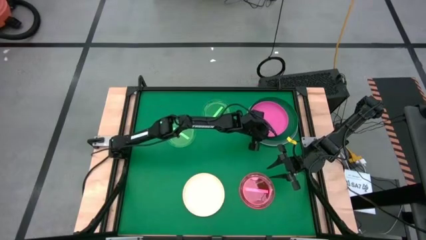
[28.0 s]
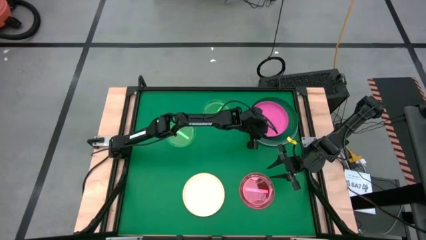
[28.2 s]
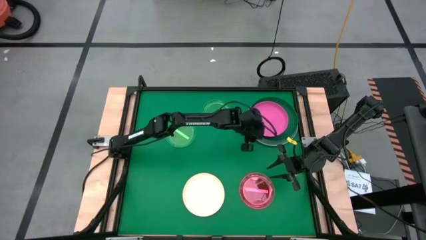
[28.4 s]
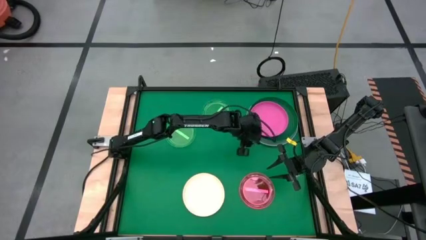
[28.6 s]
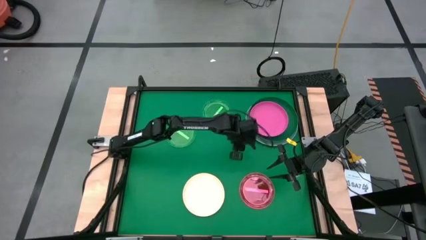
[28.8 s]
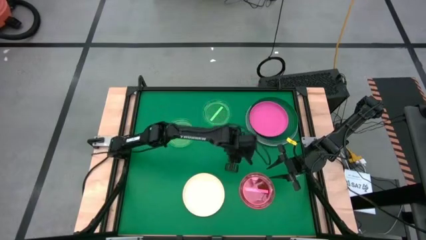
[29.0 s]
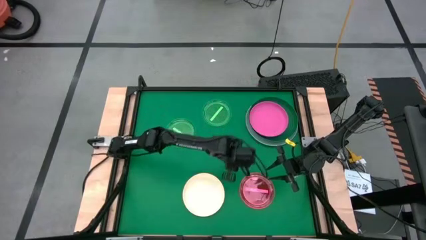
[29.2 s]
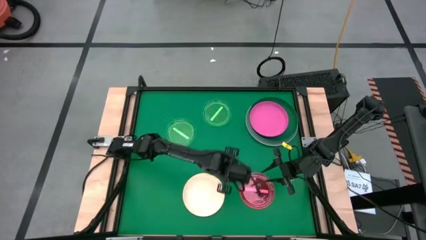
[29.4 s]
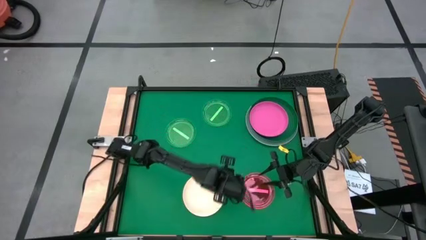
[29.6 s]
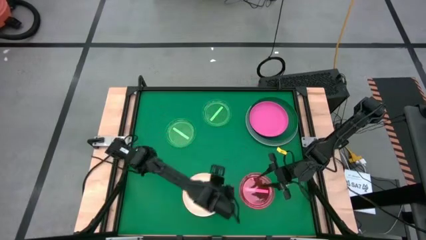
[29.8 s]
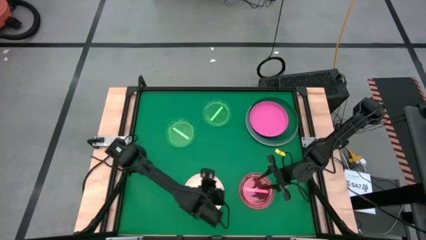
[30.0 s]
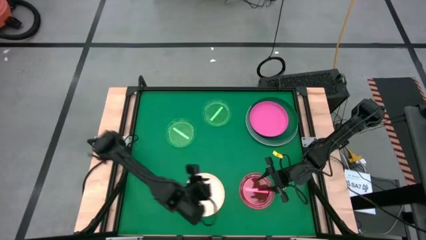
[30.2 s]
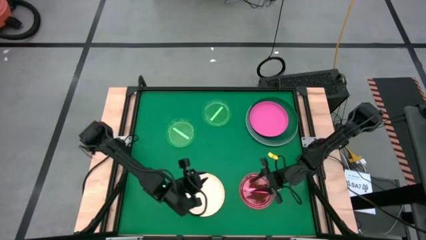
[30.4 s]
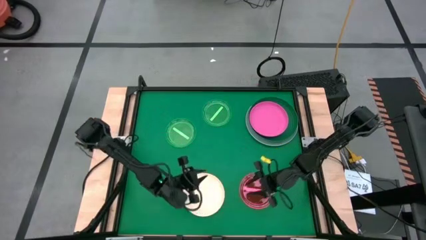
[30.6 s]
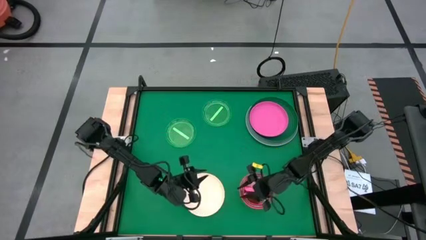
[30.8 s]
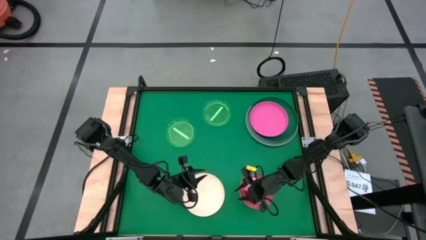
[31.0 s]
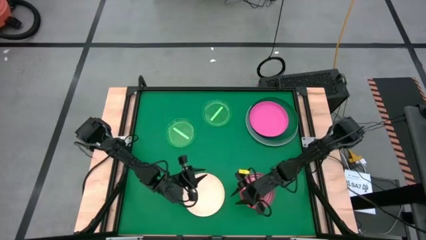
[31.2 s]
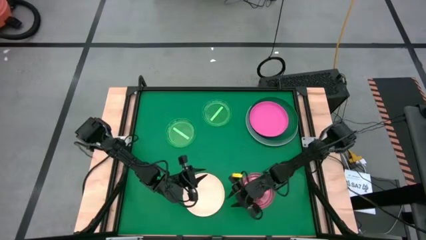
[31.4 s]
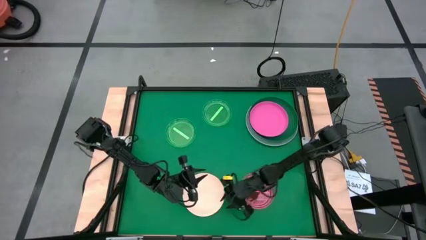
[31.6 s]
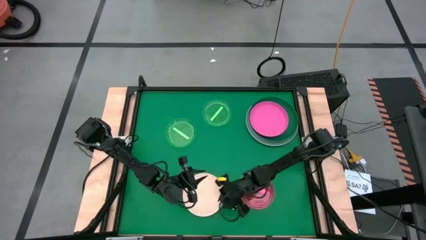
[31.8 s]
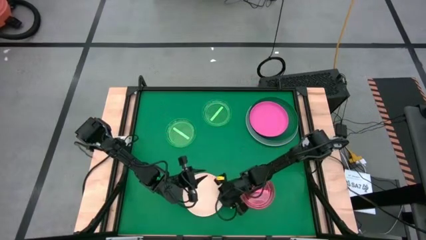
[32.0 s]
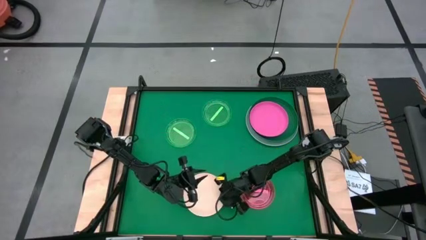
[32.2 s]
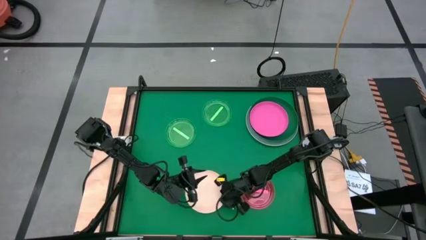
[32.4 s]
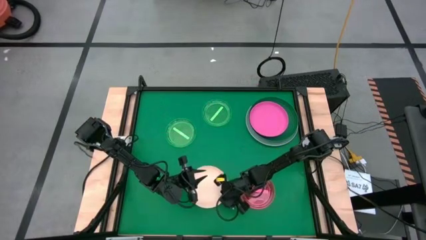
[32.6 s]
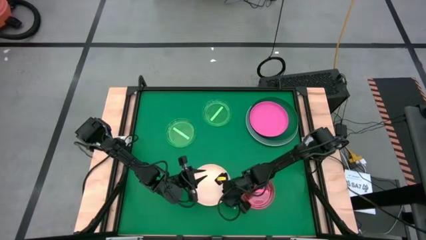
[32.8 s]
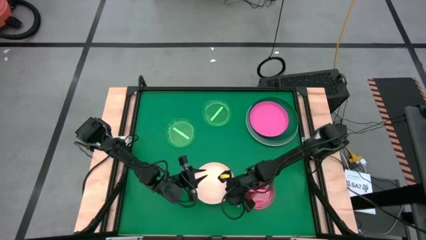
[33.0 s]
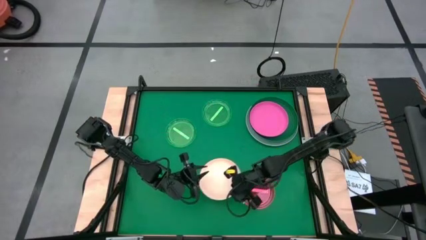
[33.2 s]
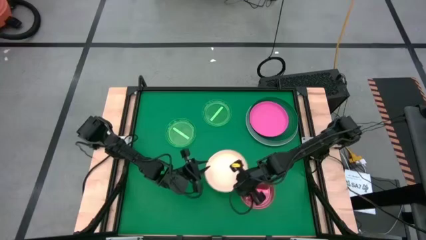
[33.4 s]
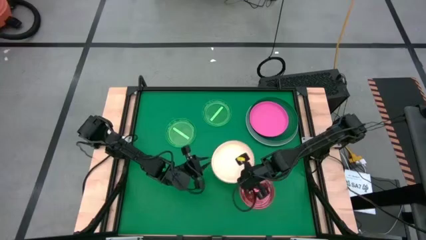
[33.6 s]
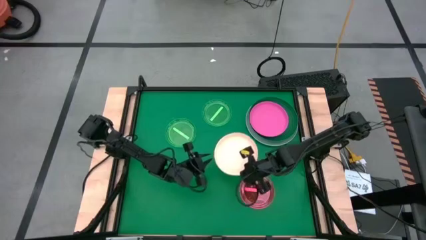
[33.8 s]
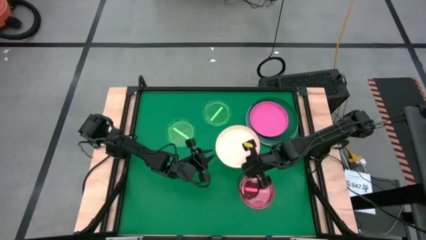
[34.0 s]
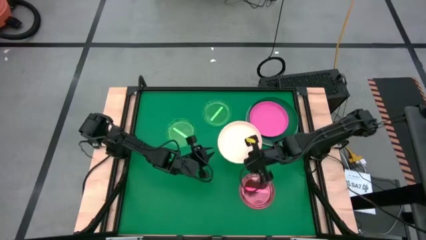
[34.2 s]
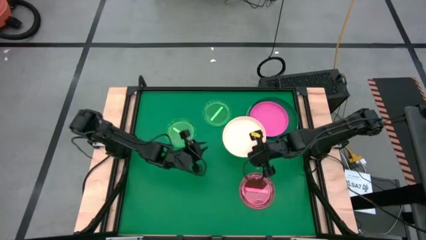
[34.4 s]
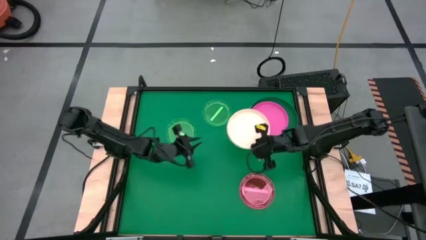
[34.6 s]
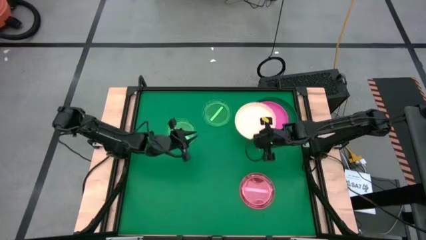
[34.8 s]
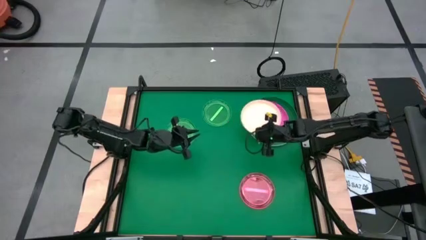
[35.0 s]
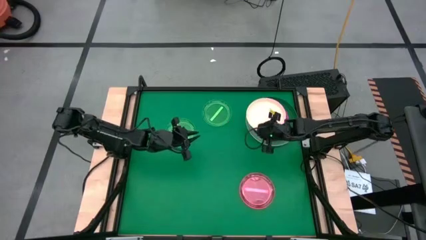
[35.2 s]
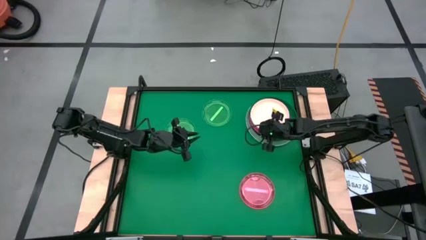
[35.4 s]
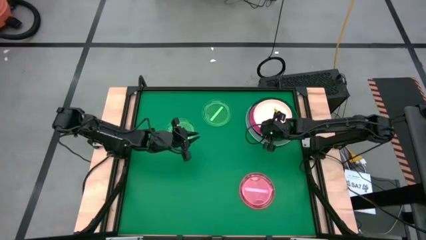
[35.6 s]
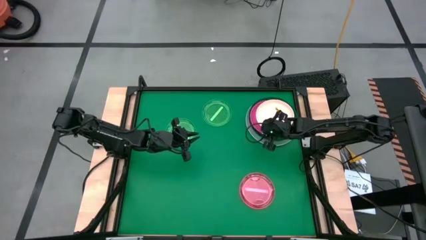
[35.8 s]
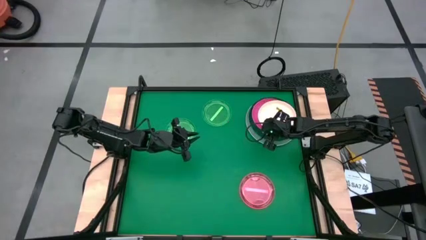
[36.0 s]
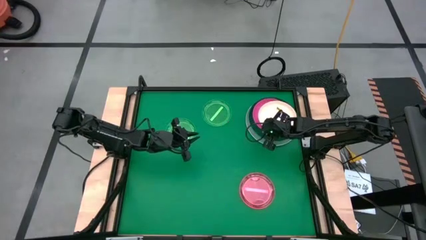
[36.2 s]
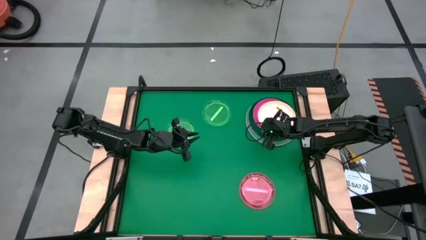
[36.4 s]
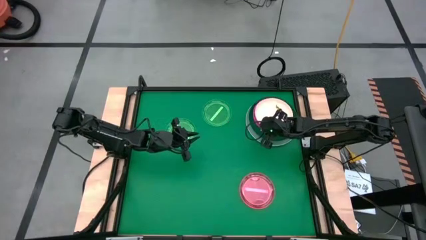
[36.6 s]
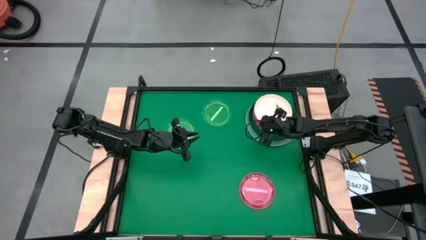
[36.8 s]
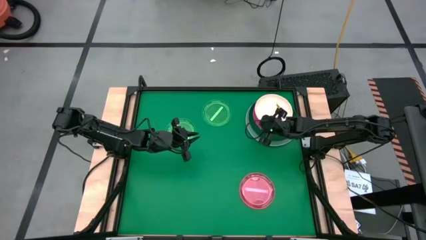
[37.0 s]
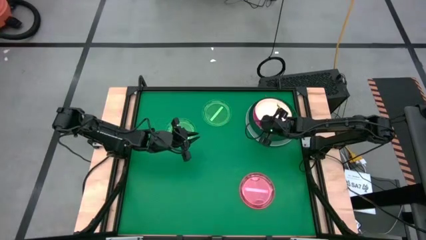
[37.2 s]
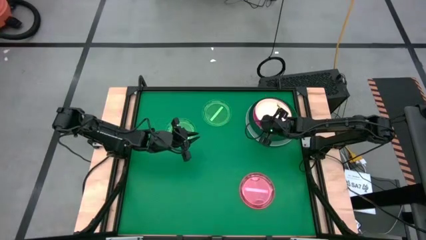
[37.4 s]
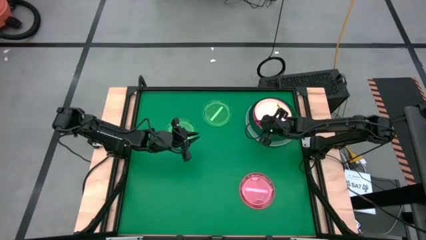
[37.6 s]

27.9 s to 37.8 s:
Task: Stack plastic plates
Stack the white plate on top of the pink plate

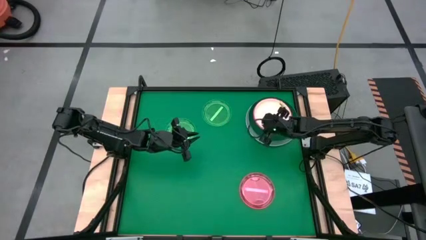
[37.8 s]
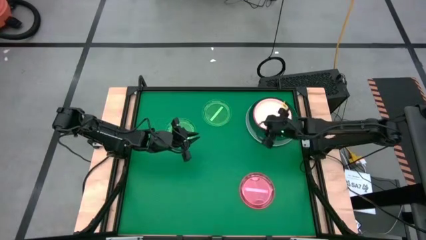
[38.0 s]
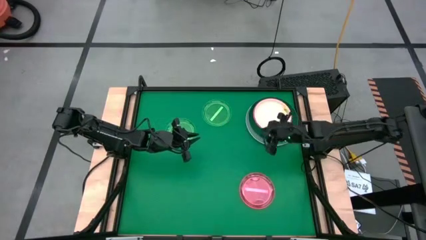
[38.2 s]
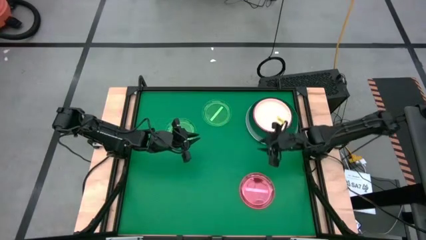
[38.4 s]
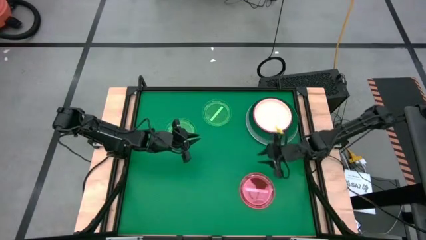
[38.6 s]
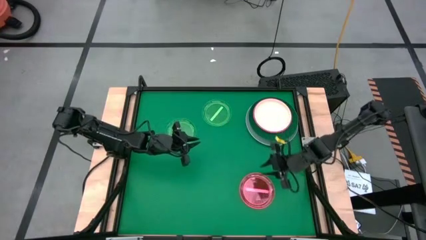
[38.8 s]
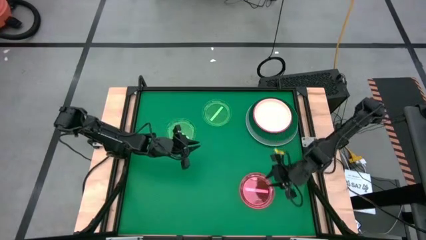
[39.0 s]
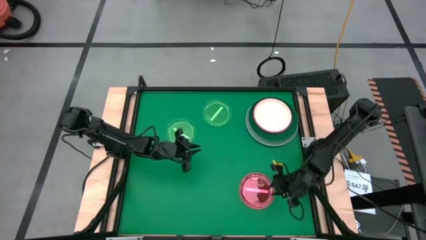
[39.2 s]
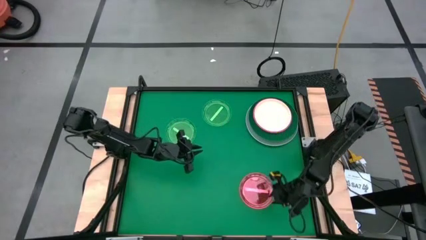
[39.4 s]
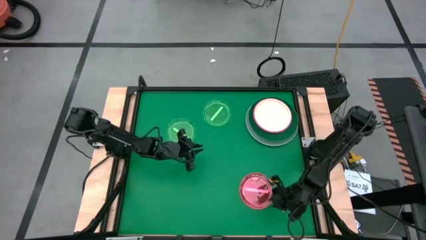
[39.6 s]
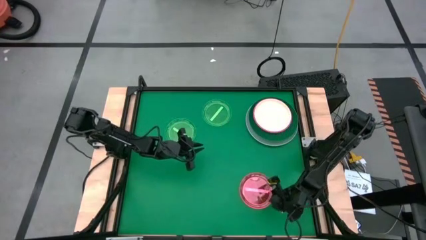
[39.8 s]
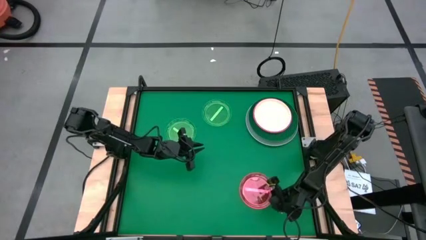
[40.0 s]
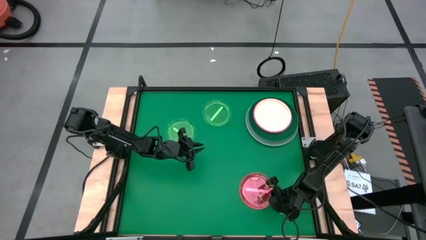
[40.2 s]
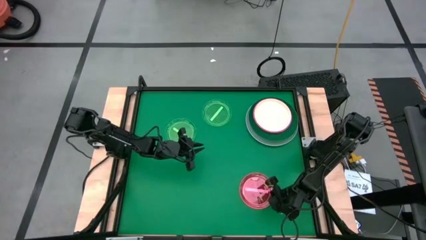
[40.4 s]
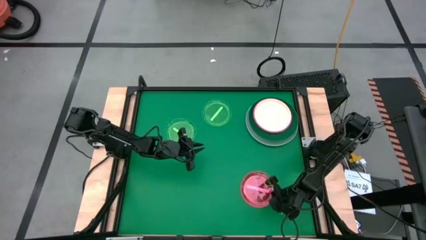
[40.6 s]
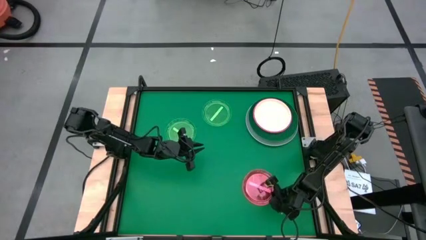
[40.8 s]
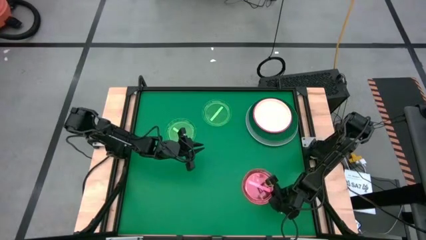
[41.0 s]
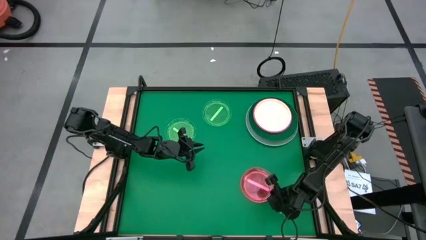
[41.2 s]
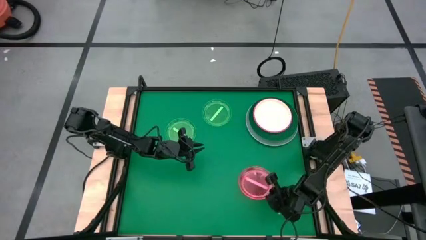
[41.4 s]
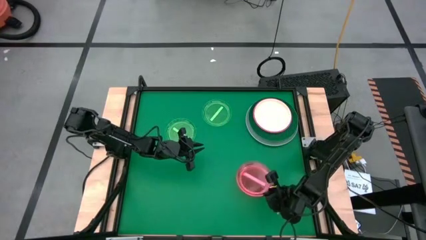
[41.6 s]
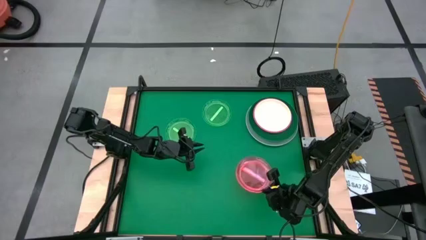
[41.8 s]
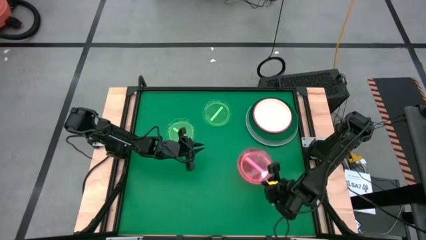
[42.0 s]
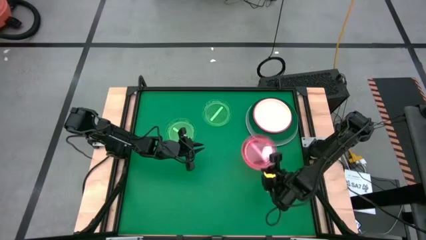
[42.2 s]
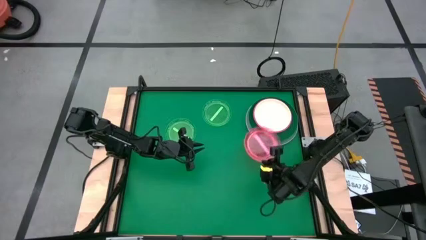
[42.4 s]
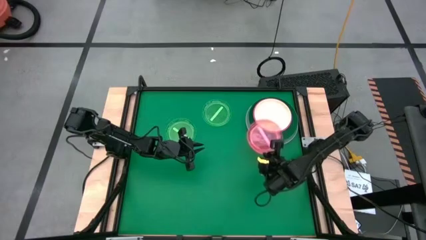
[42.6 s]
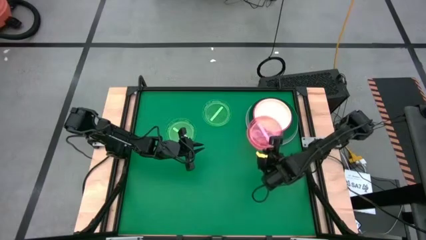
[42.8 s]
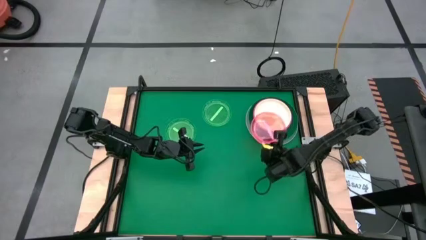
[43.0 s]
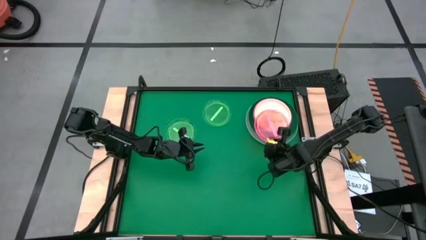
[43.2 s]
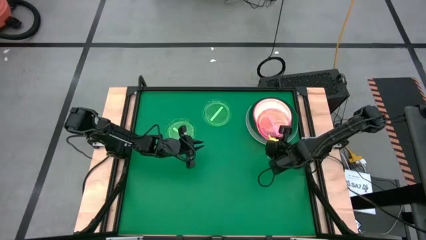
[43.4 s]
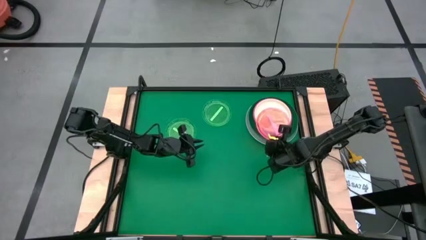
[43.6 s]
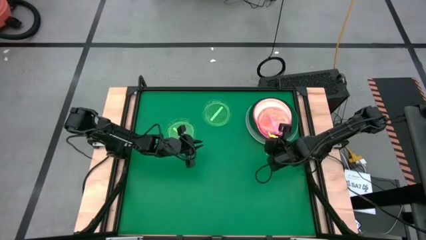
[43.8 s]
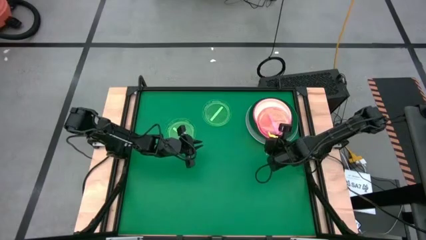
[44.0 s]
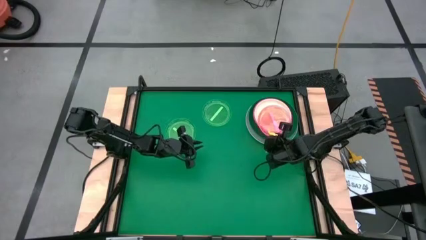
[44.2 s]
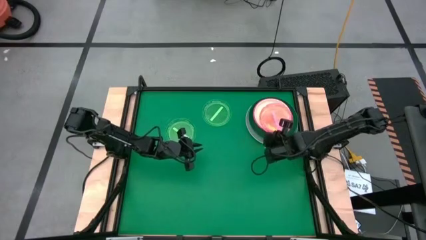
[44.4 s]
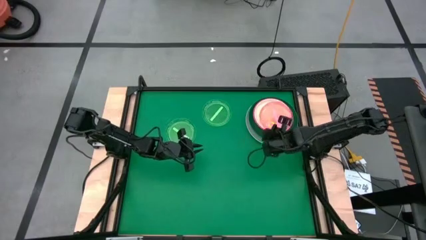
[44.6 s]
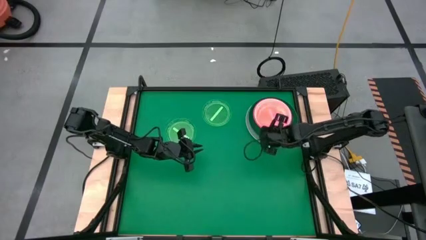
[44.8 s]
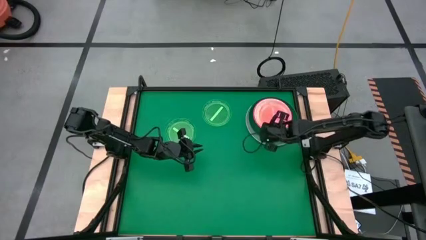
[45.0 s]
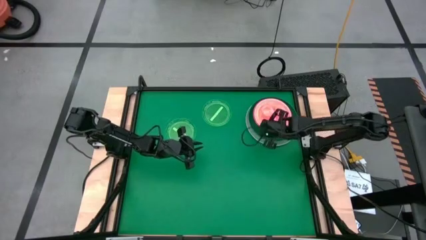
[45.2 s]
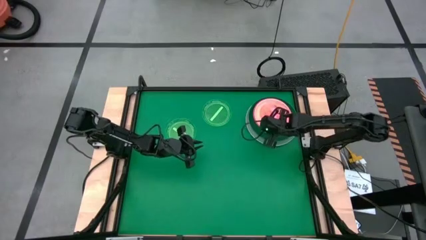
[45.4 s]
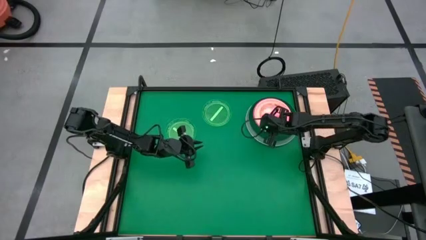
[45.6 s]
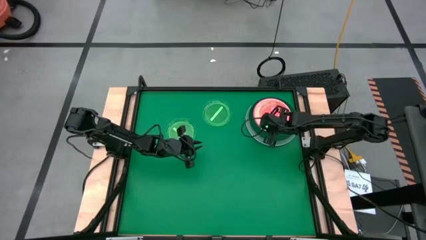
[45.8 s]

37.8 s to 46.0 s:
Stack the orange plate on top of the white plate
